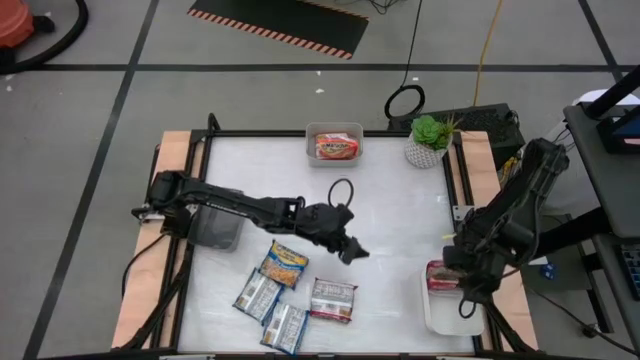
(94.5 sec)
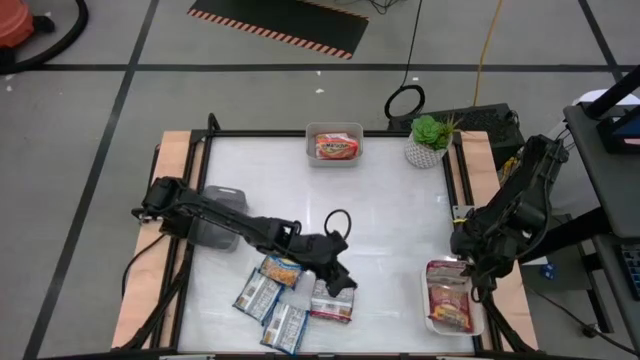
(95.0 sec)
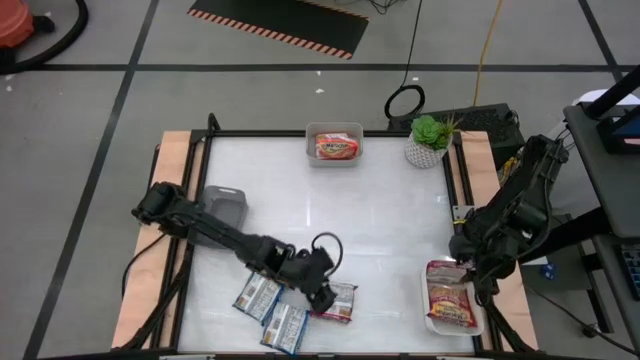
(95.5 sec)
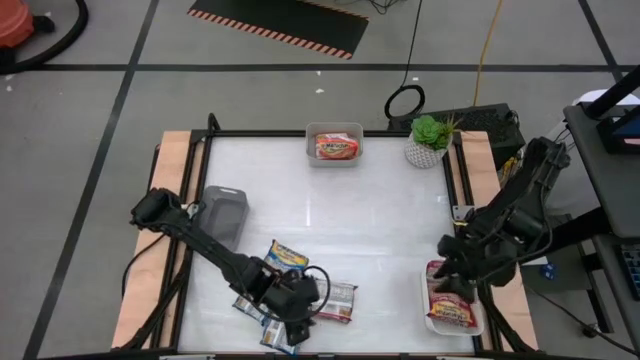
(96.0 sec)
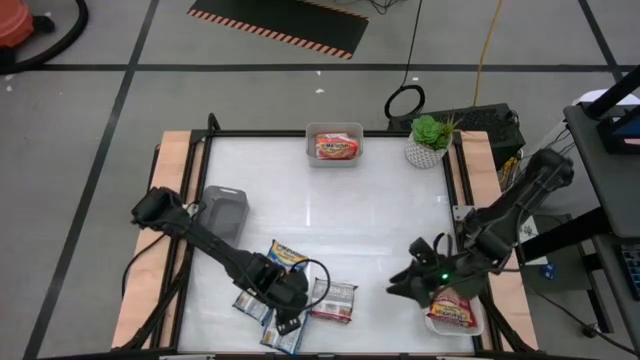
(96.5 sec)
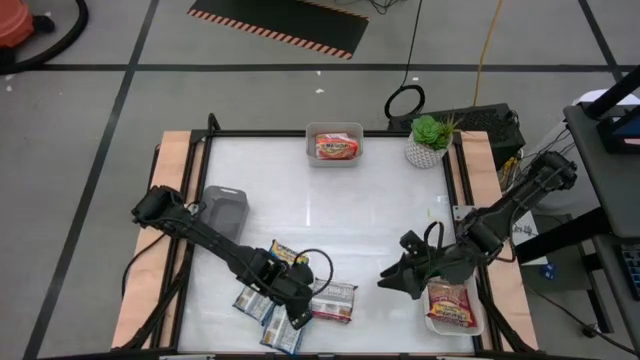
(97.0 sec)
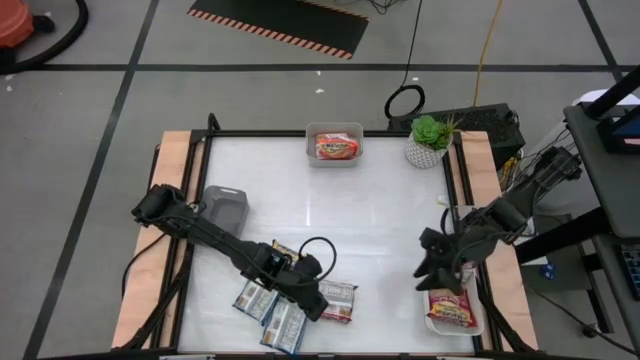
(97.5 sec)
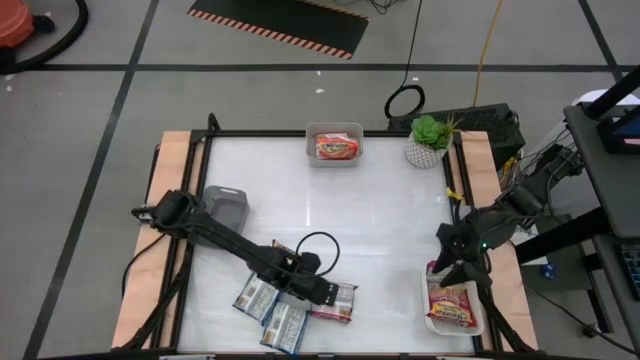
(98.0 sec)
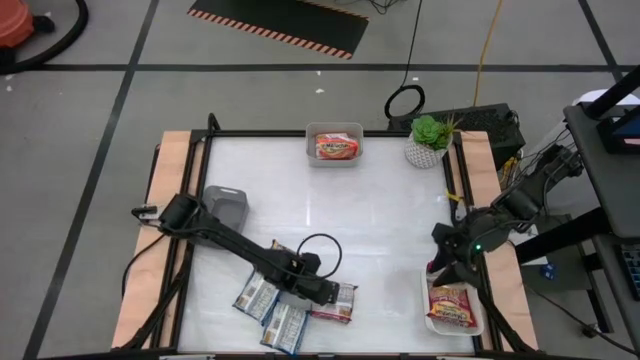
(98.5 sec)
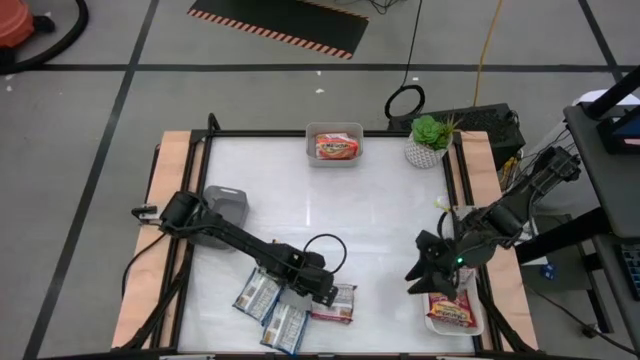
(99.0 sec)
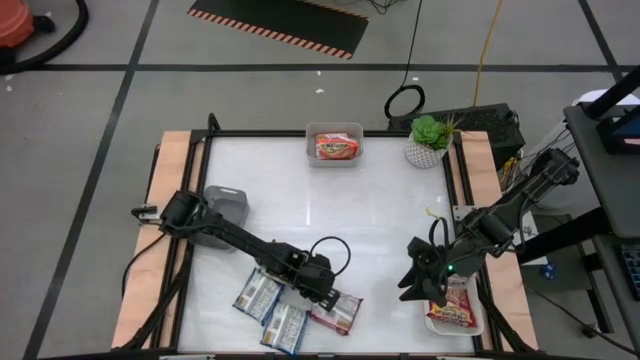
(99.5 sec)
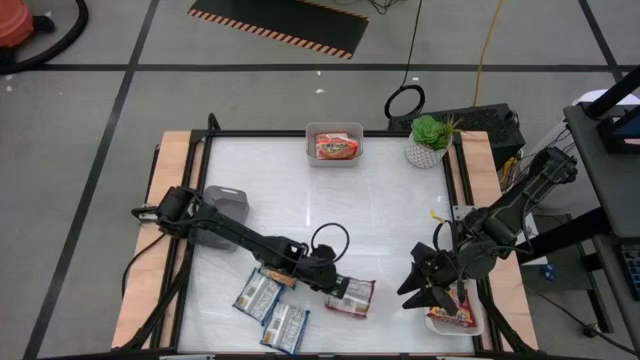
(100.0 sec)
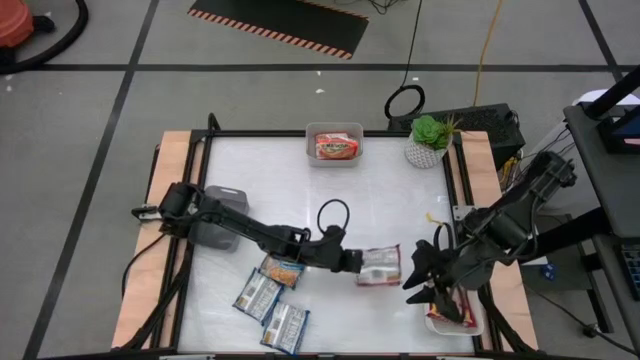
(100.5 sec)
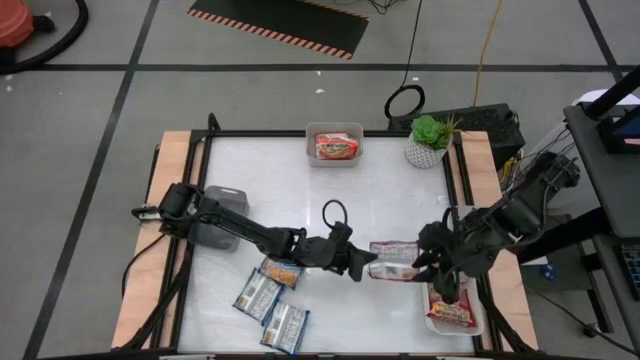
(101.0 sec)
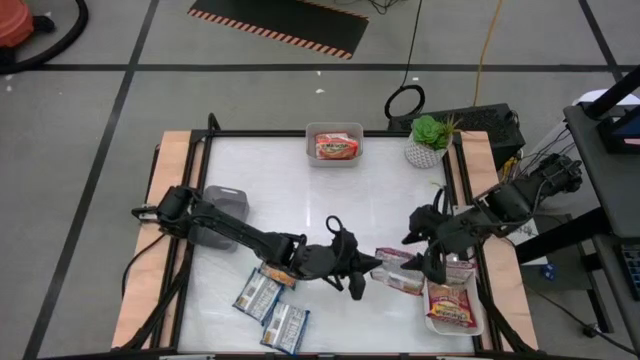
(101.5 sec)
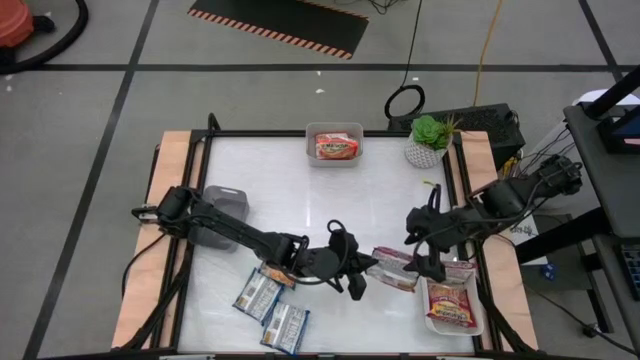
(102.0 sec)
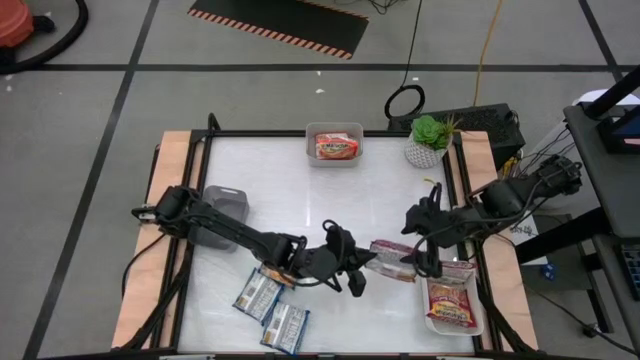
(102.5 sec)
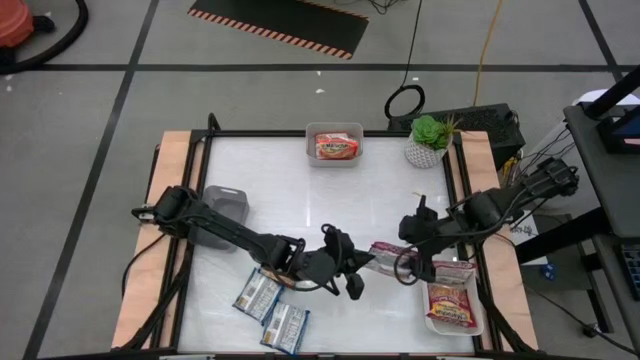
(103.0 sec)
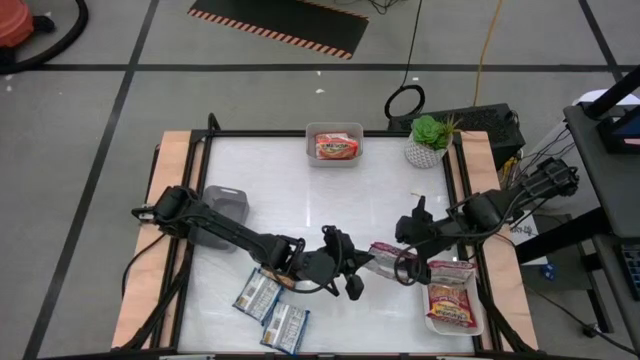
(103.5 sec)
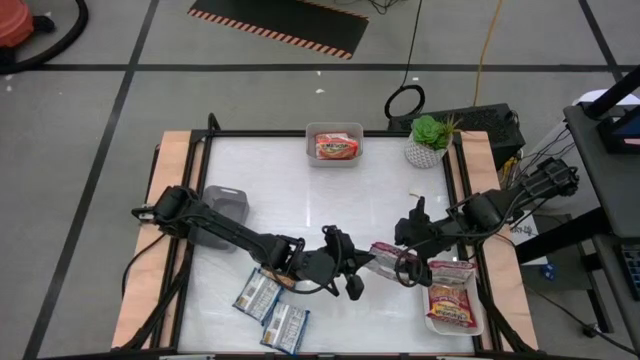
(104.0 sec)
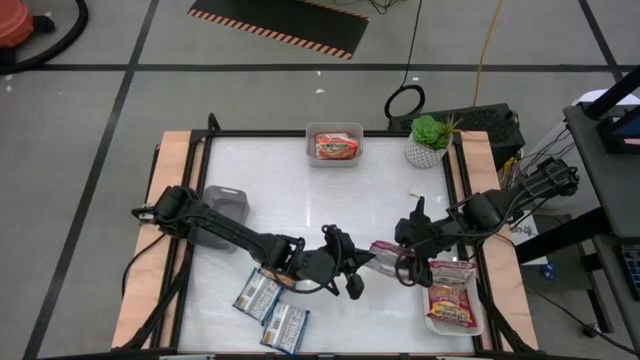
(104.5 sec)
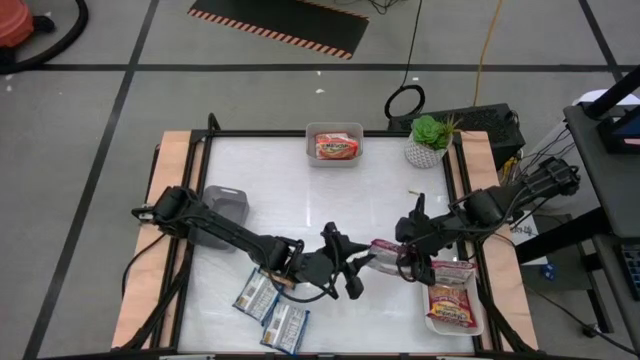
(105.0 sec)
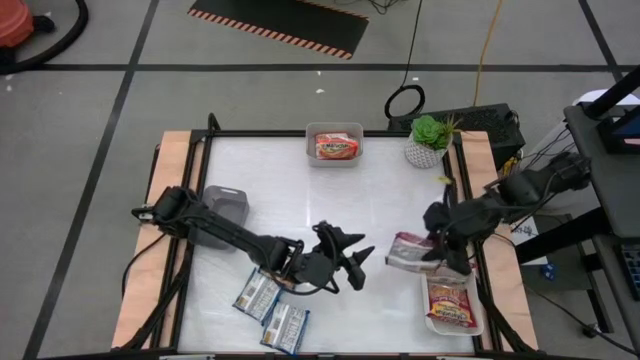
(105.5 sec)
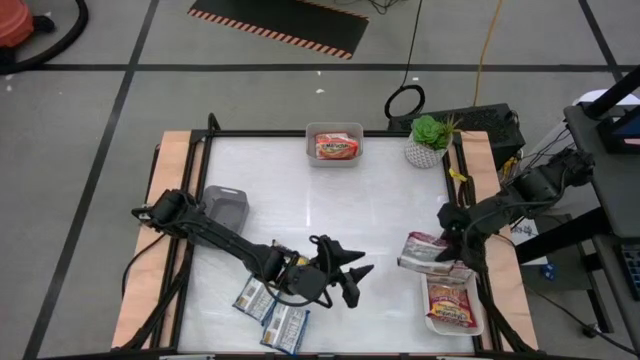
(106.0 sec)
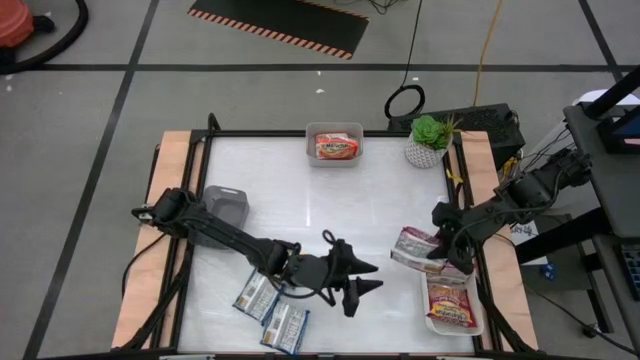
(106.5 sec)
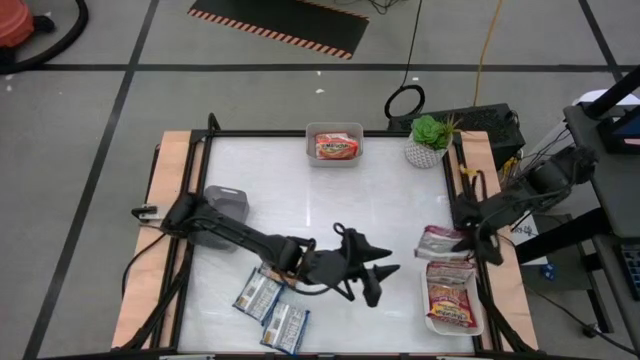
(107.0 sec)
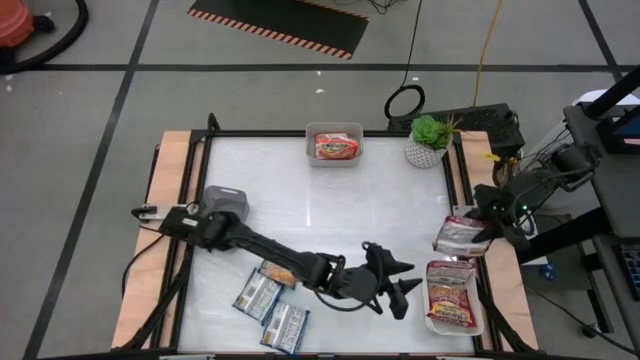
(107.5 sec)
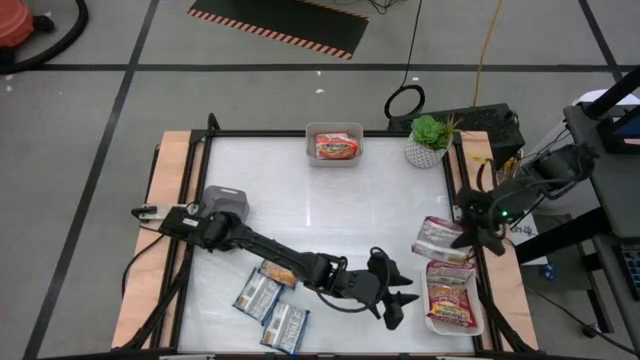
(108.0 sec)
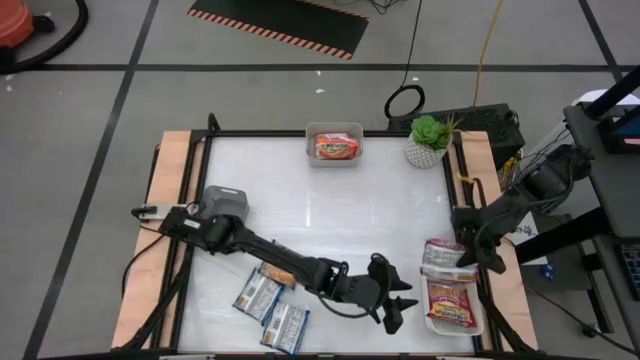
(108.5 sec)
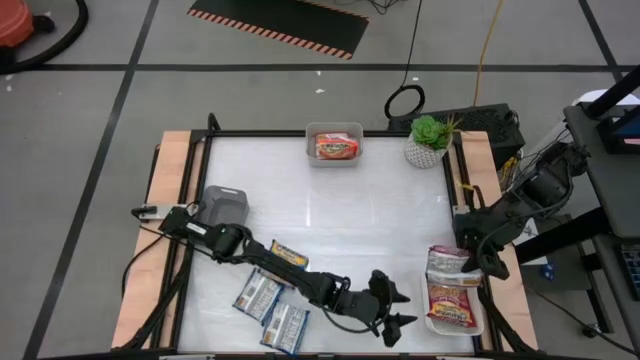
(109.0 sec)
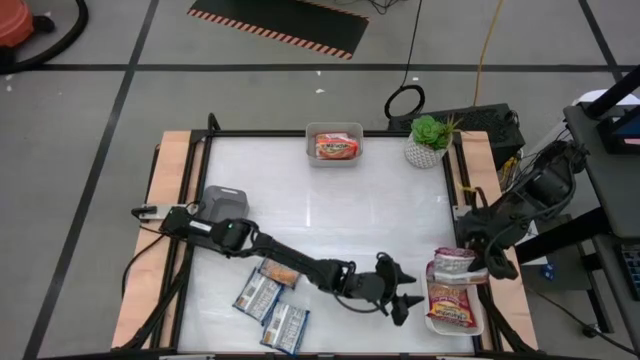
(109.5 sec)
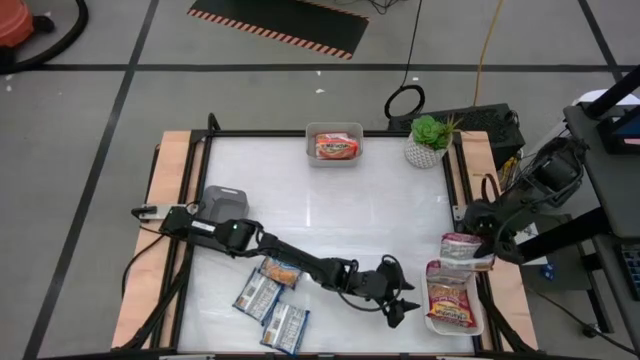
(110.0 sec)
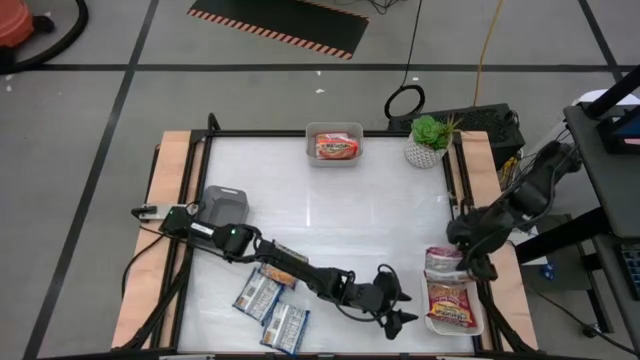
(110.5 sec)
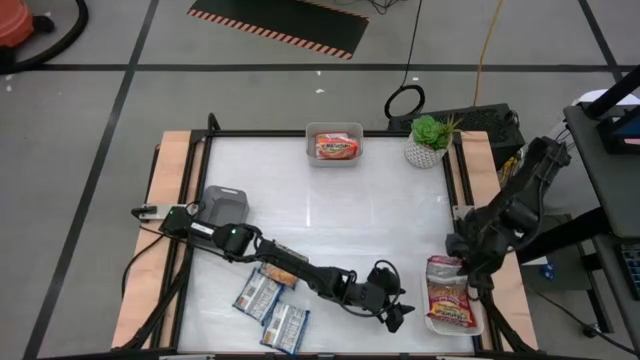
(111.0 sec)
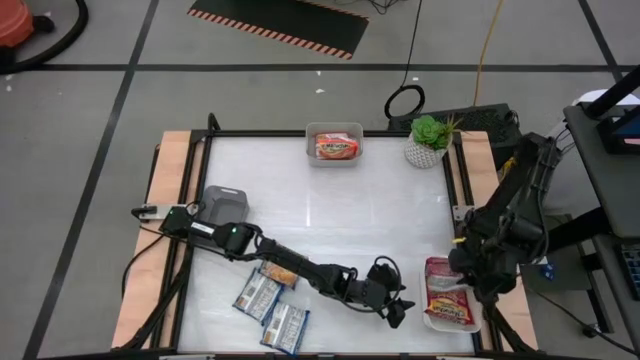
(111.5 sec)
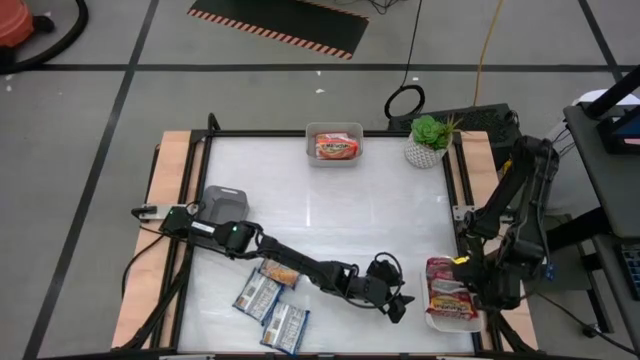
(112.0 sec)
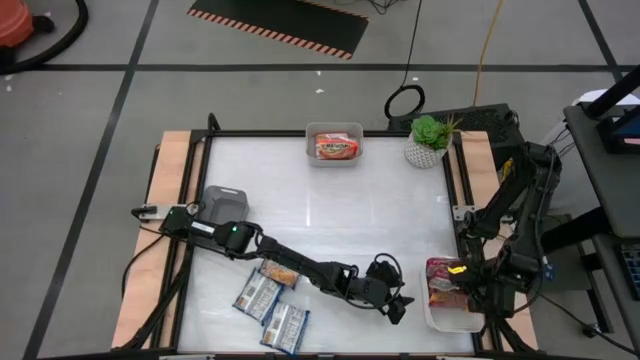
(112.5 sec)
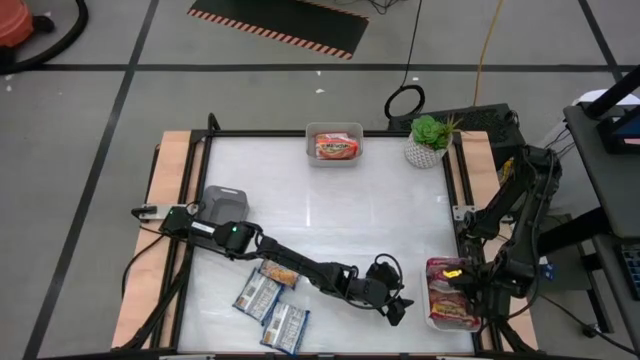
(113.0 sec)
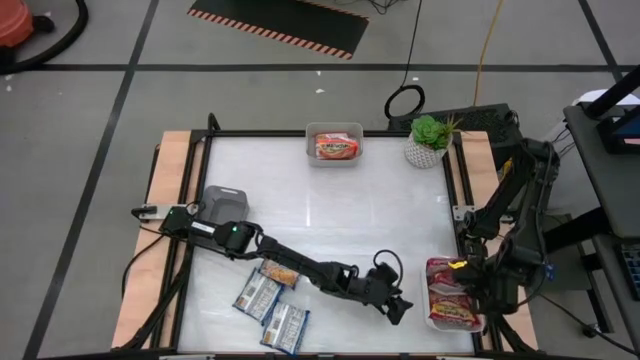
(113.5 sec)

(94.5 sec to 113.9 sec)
Task: Sort Maruchan noodles
Put the red noodle pack into the white bin

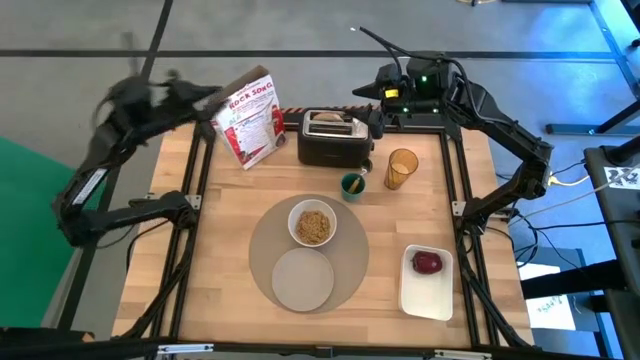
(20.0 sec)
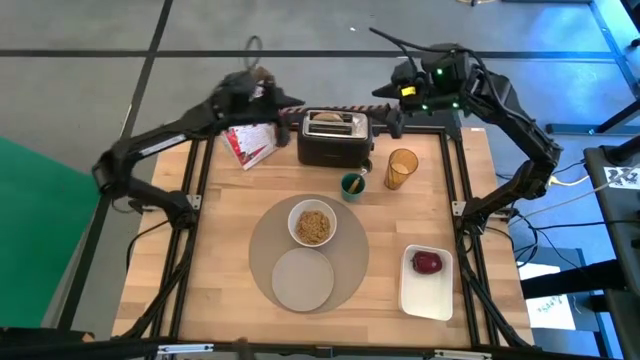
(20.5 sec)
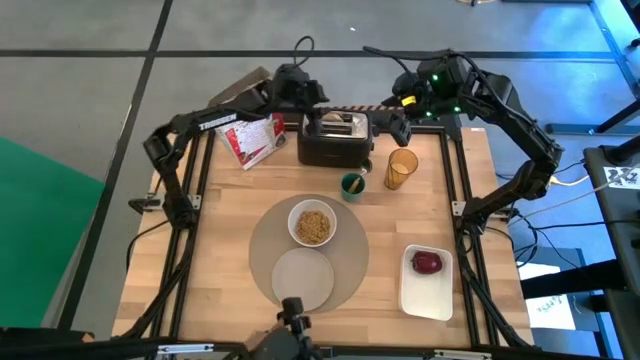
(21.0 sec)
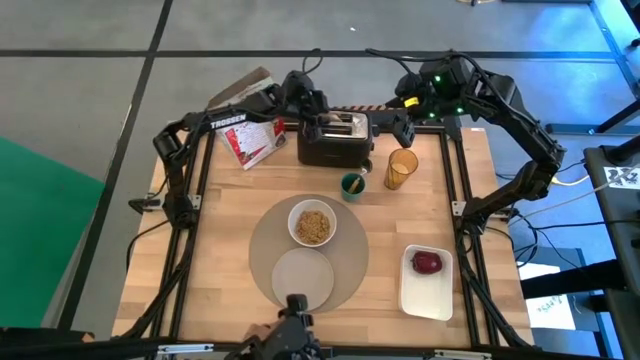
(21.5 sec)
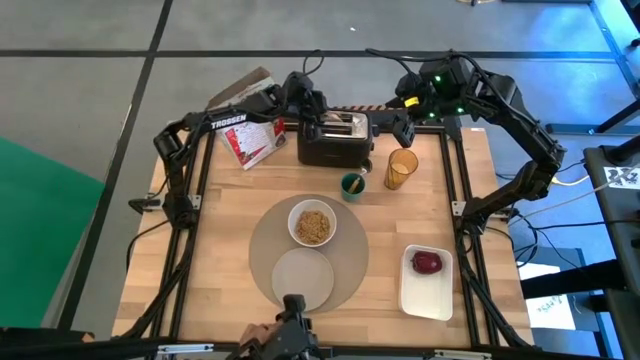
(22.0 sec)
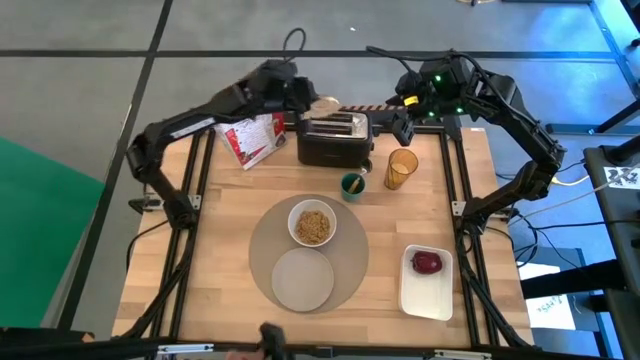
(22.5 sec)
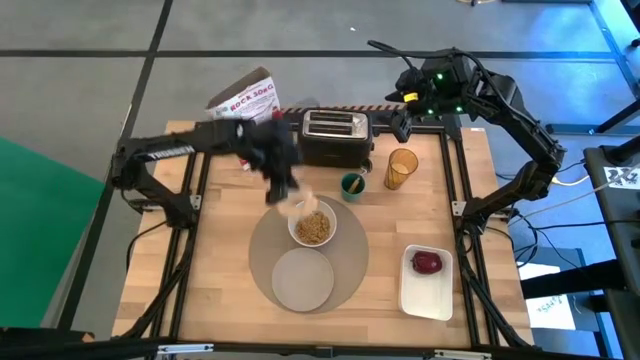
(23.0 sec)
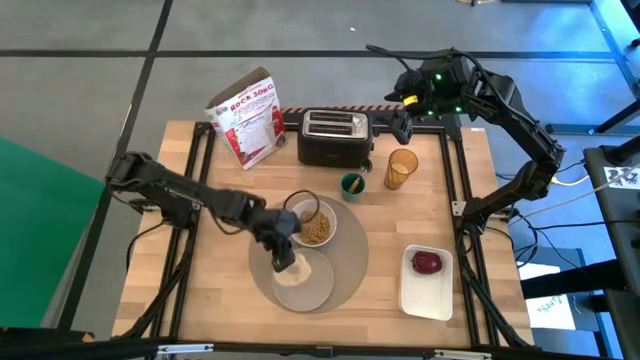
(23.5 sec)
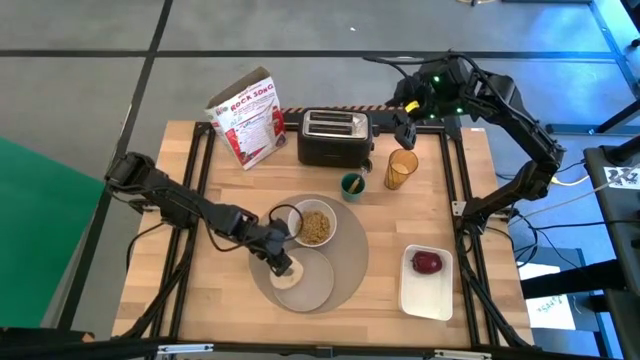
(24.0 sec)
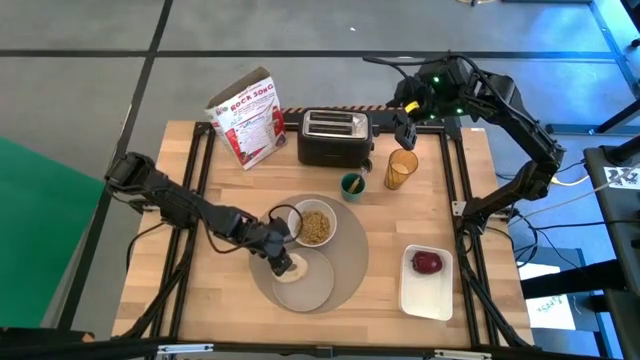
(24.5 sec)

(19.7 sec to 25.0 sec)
Task: Arrange a breakfast setting
Put the toasted bread from the toaster on the brown plate
